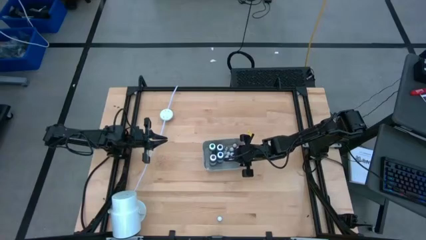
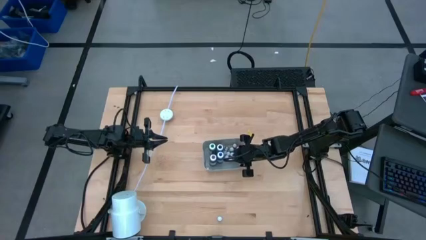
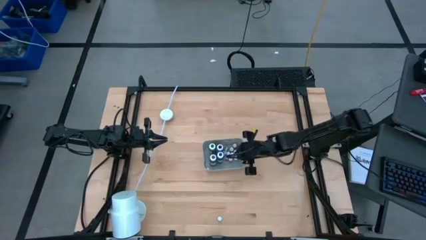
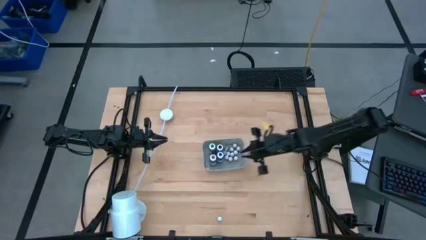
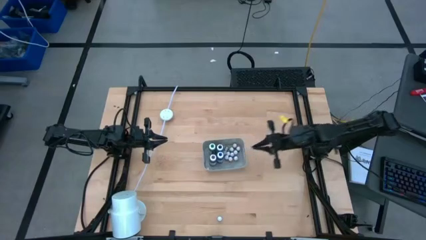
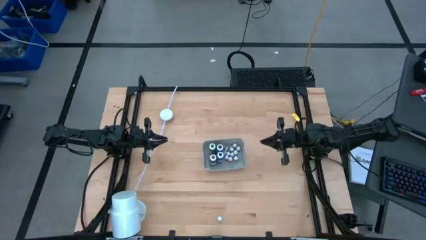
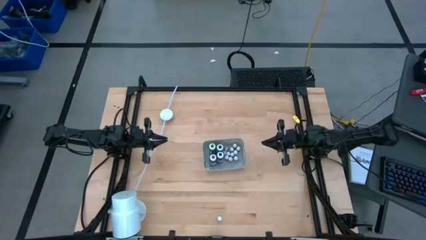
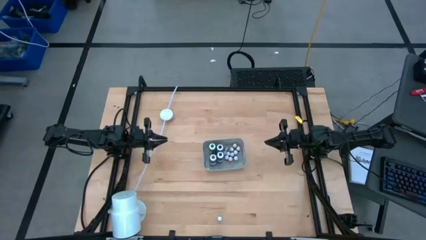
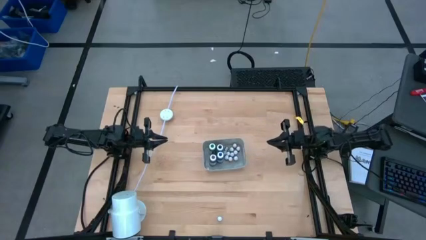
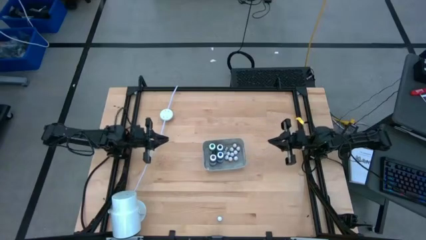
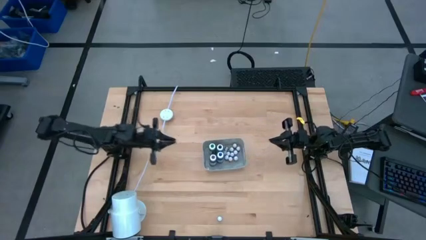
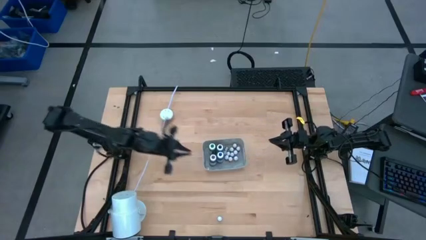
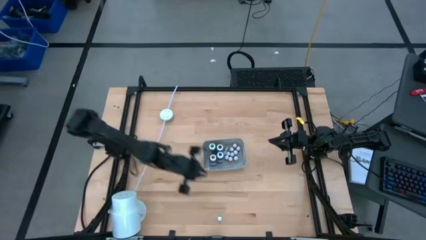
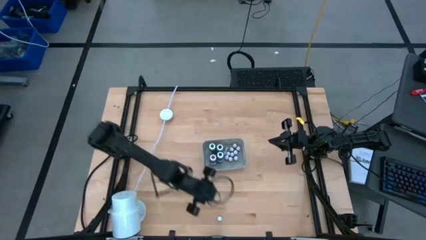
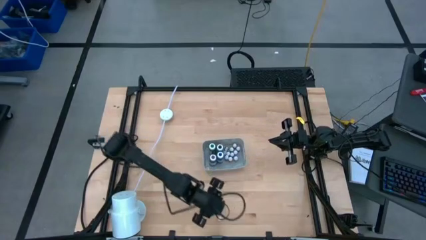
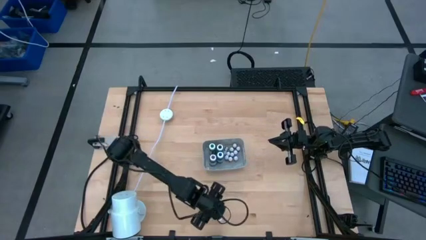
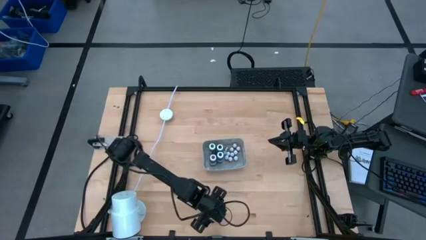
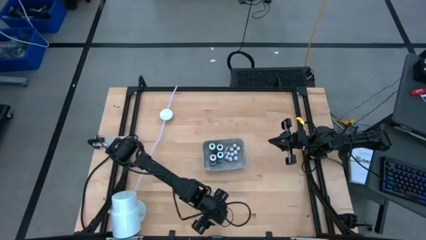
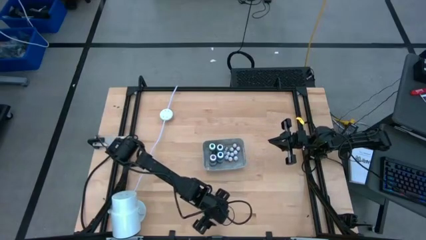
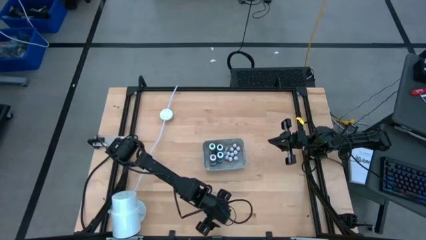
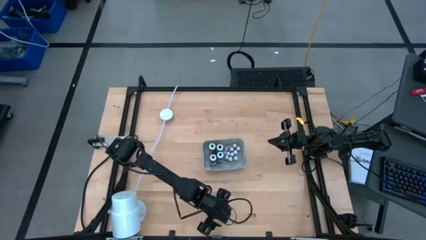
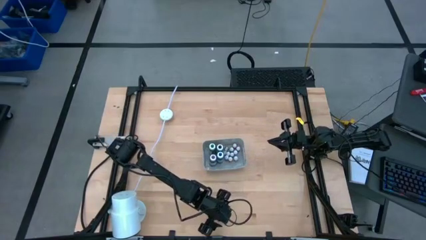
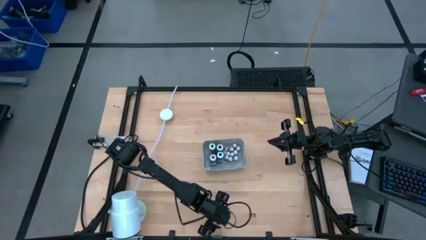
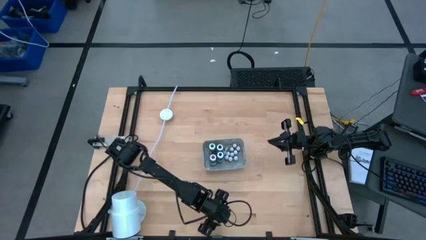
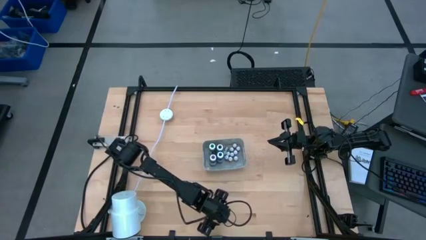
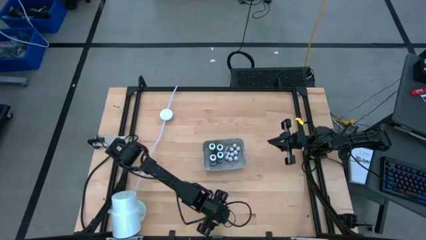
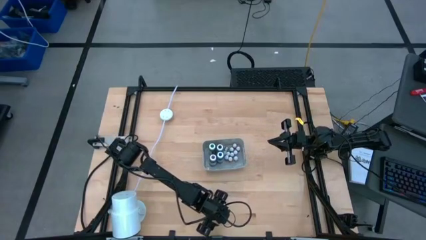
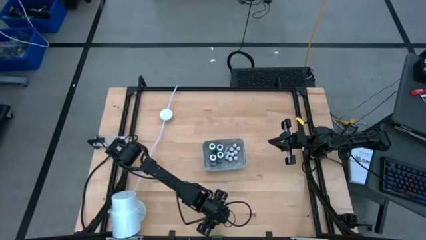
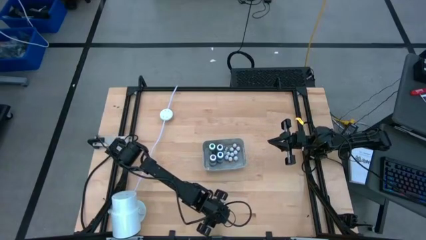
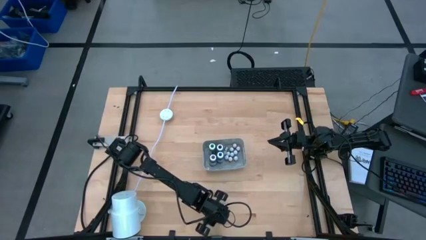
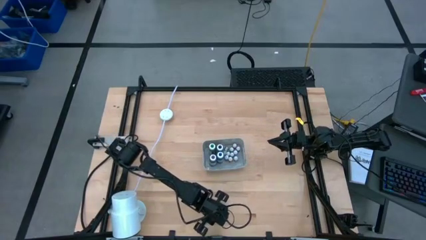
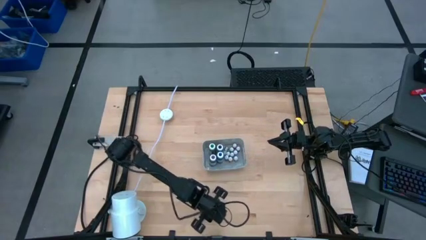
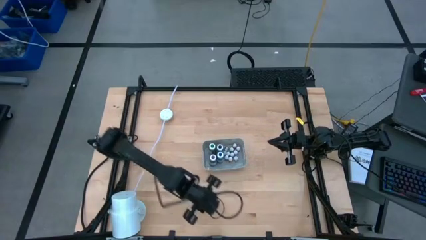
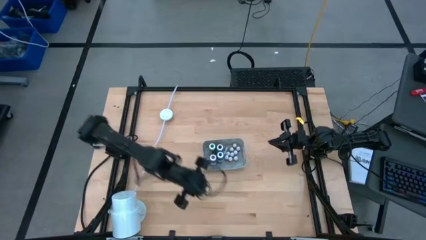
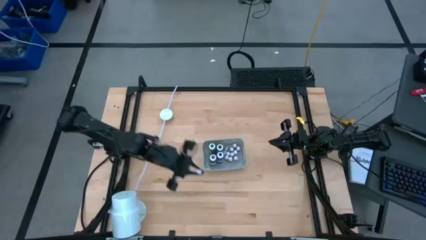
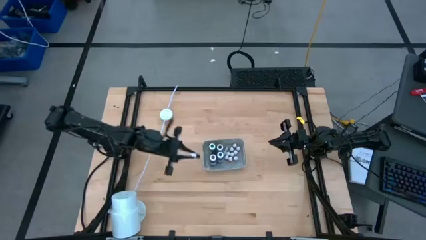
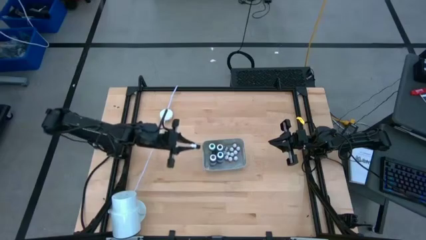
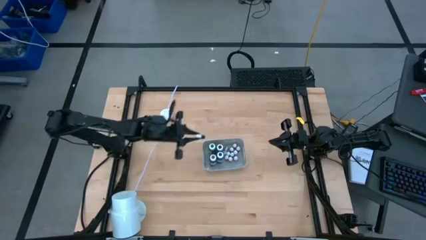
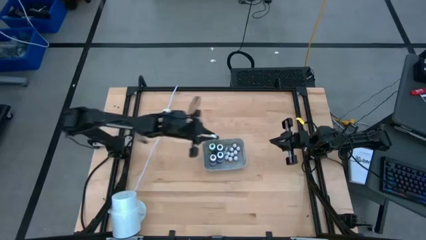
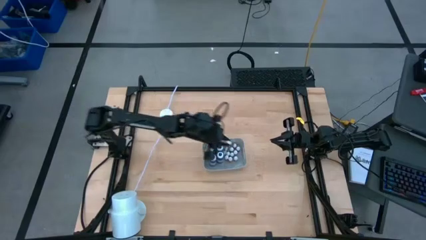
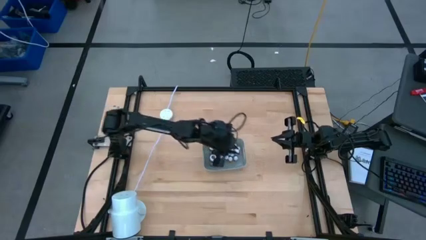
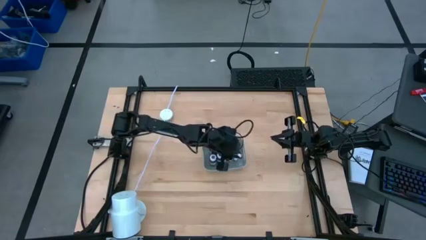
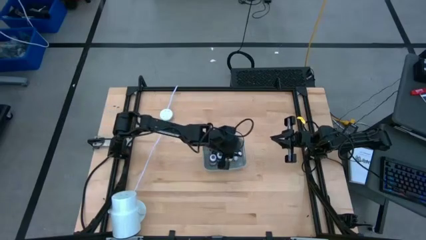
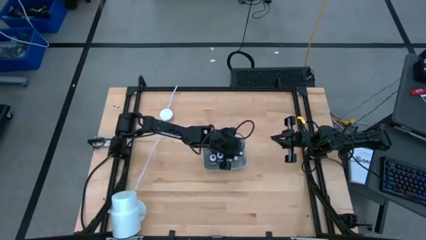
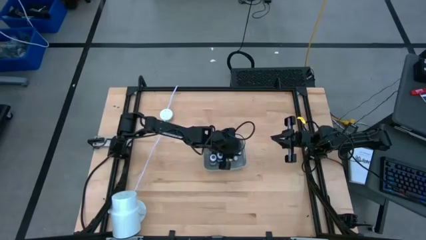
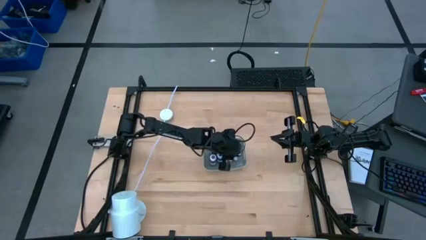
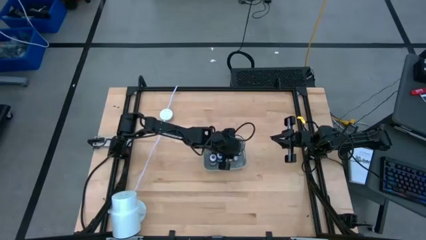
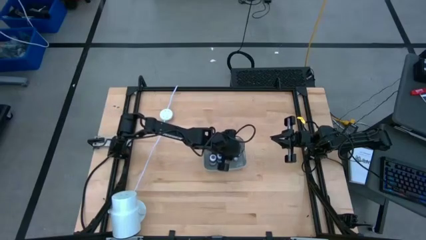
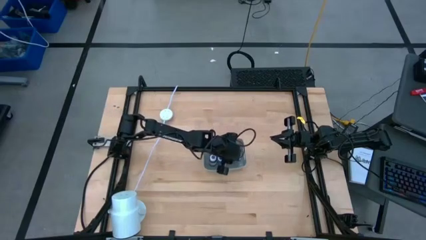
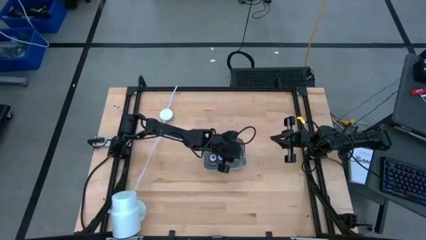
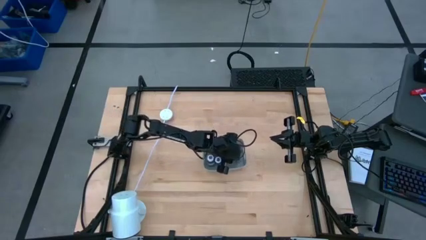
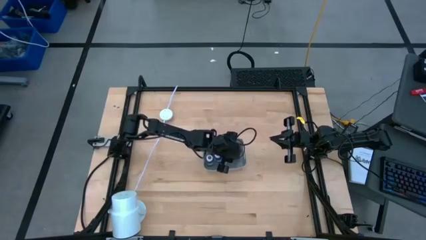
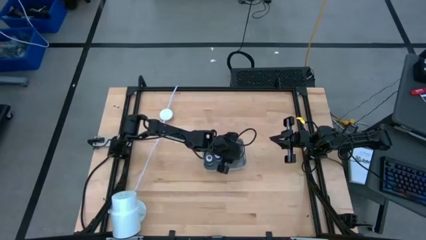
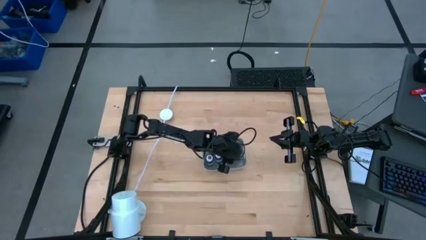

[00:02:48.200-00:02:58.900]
Task: Pick & Place food coloring
Put the small black food coloring bottle into the gray container

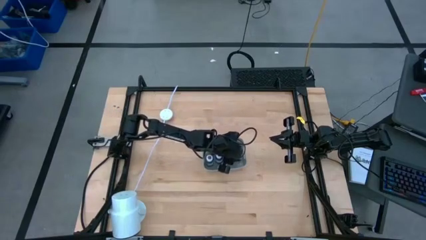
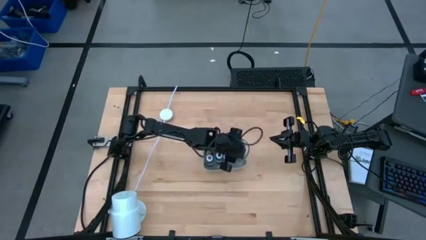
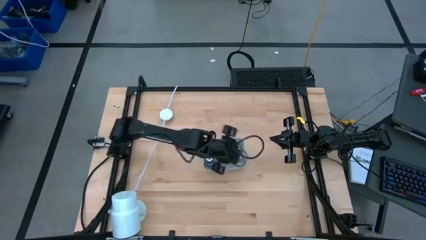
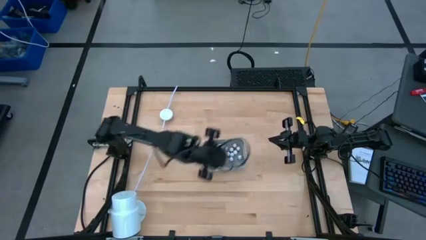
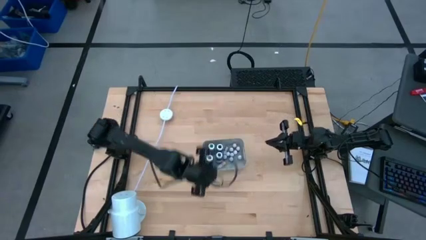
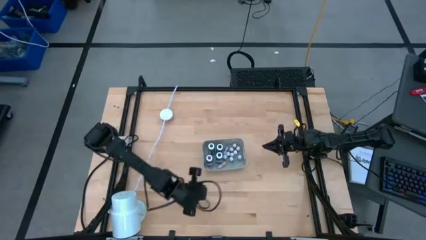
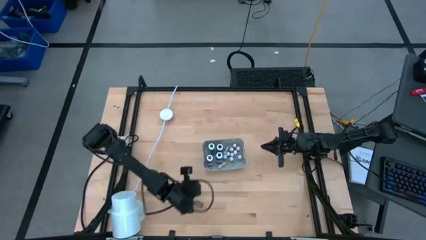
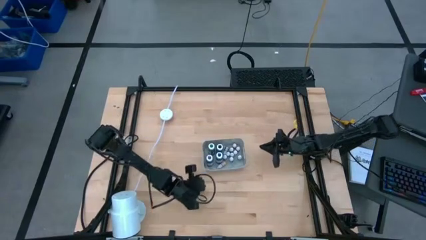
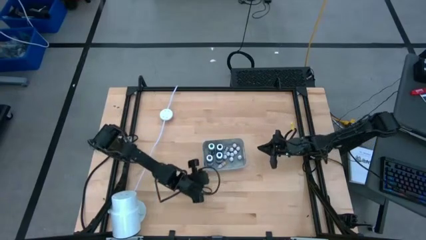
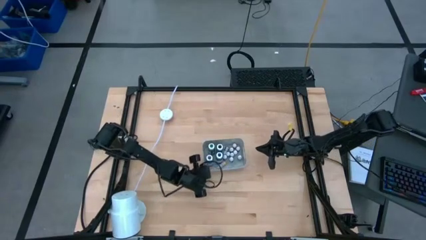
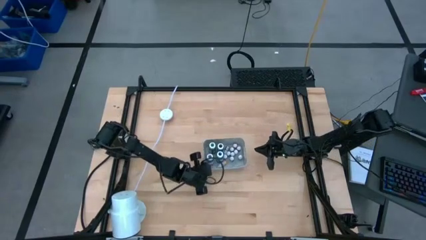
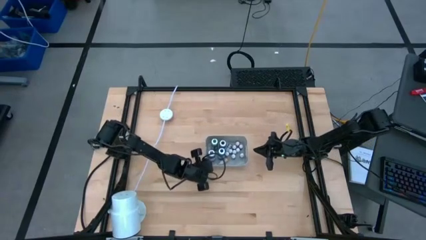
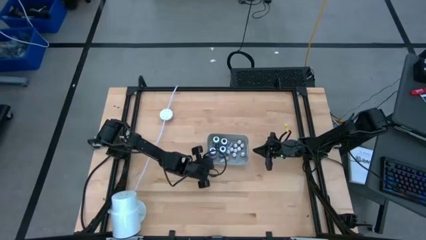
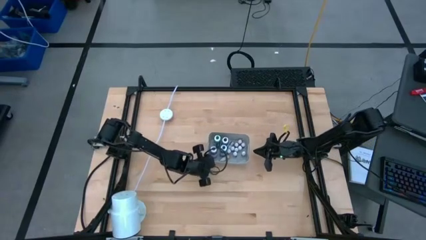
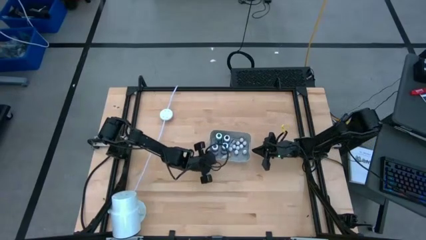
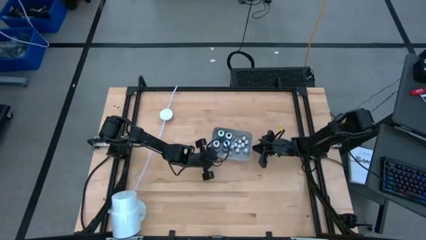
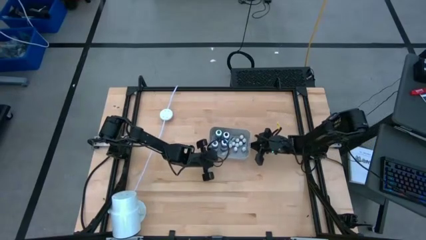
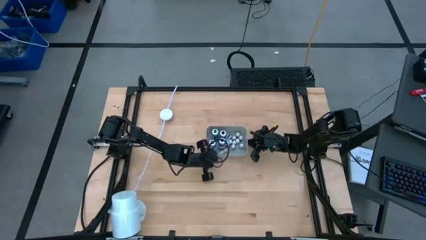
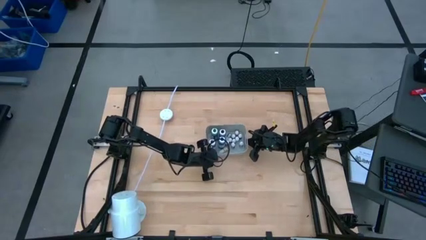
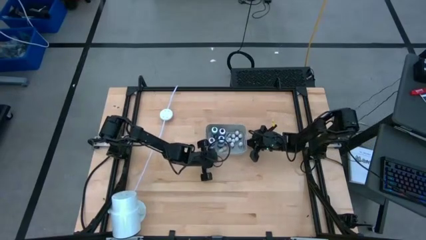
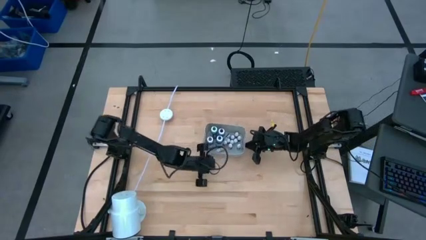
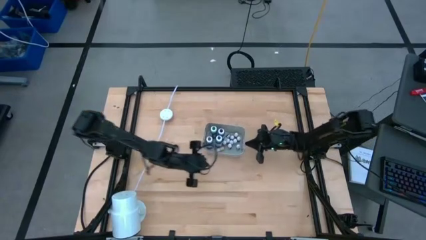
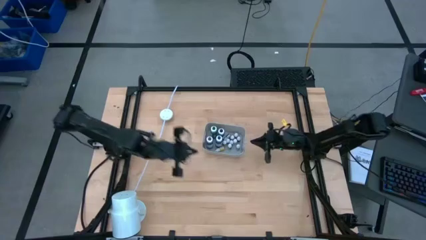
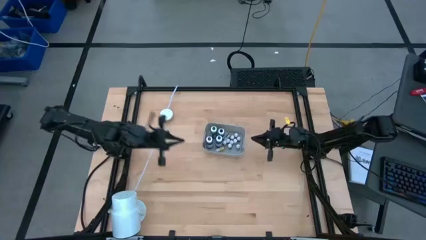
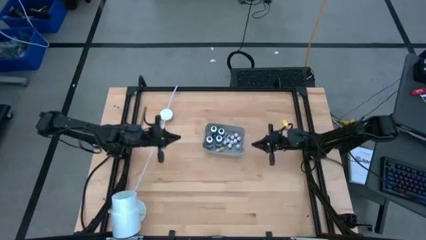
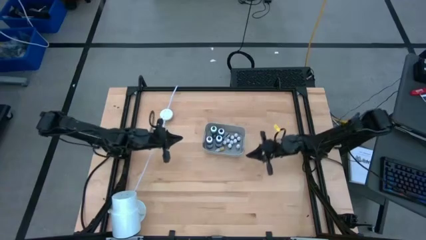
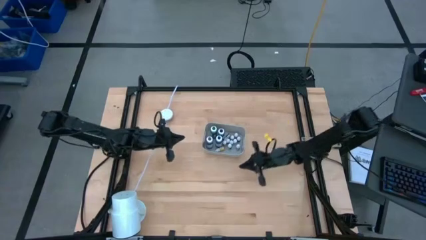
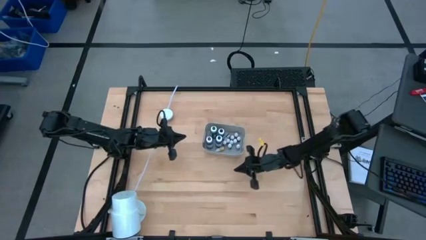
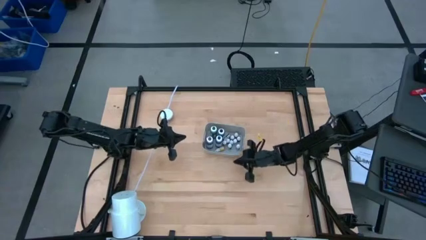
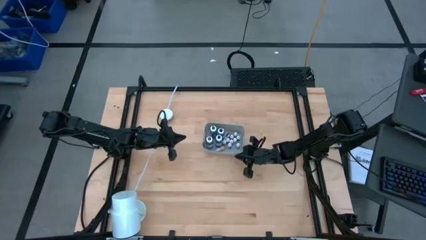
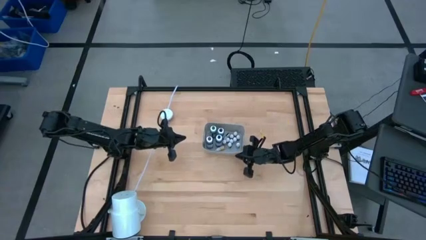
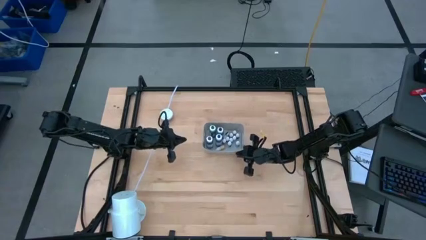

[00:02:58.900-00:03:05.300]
Adjust the gray container
